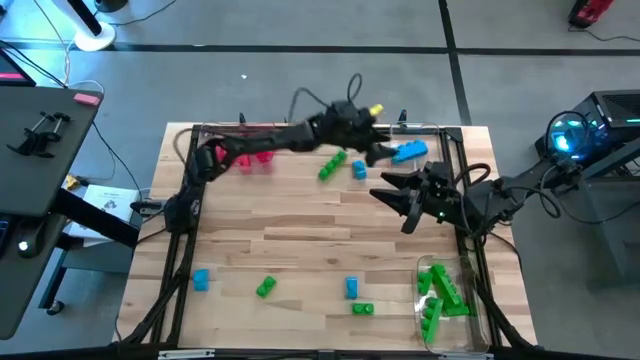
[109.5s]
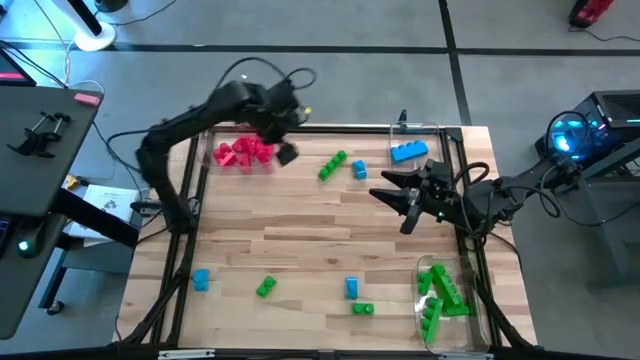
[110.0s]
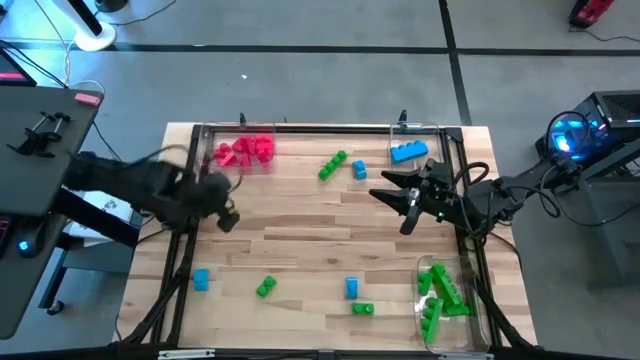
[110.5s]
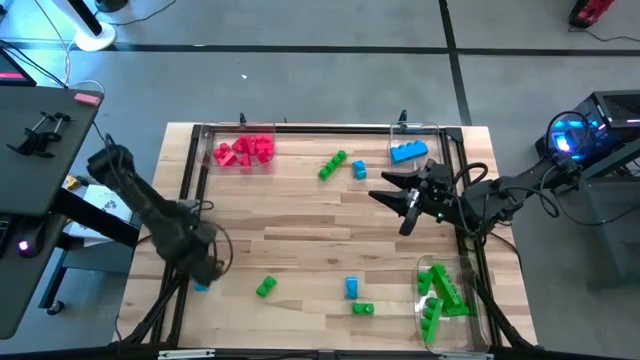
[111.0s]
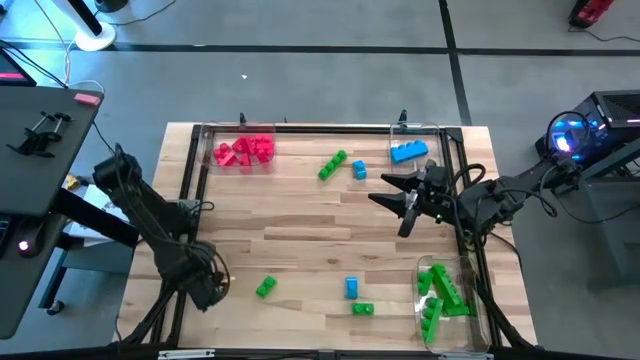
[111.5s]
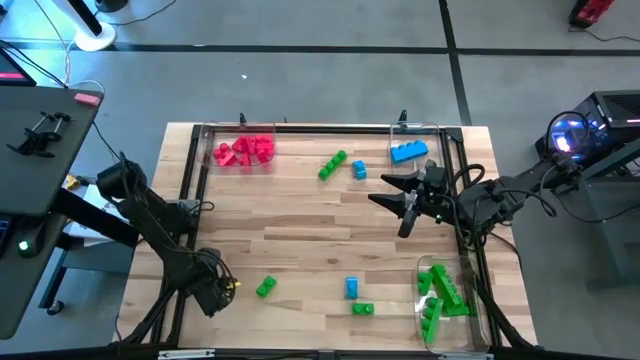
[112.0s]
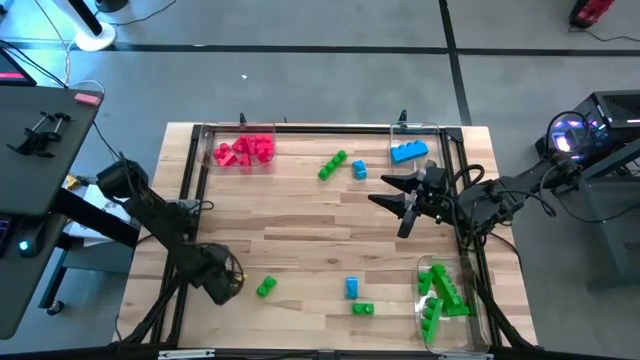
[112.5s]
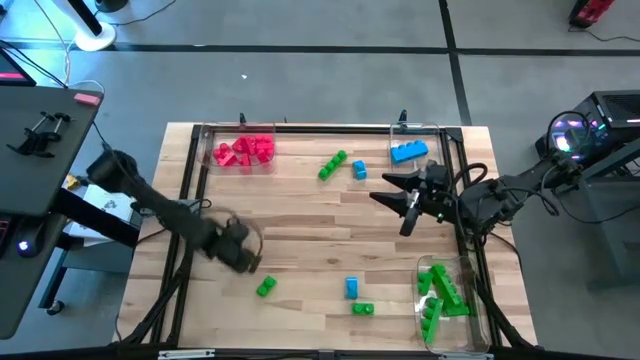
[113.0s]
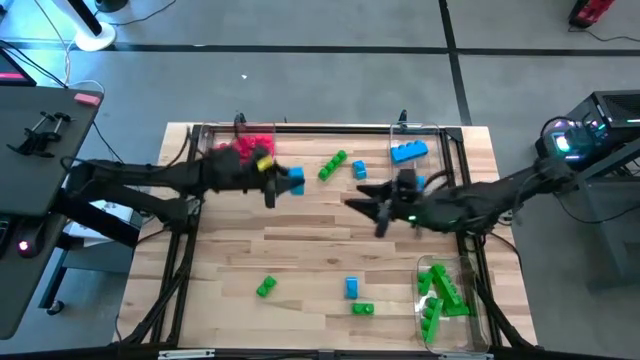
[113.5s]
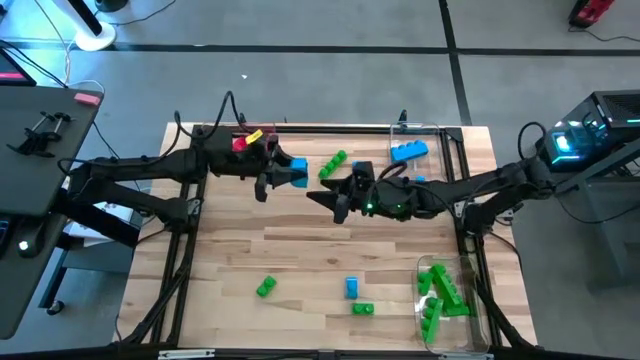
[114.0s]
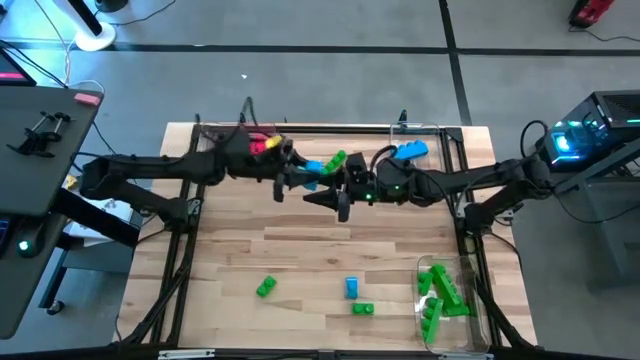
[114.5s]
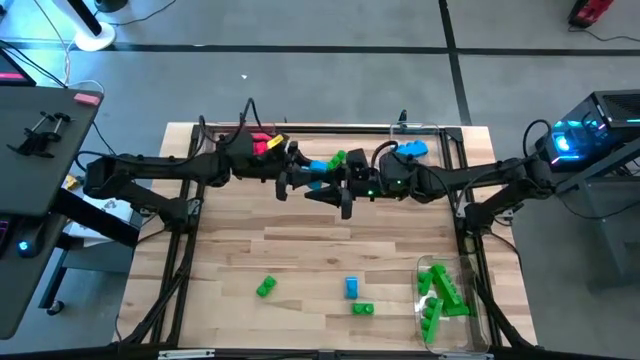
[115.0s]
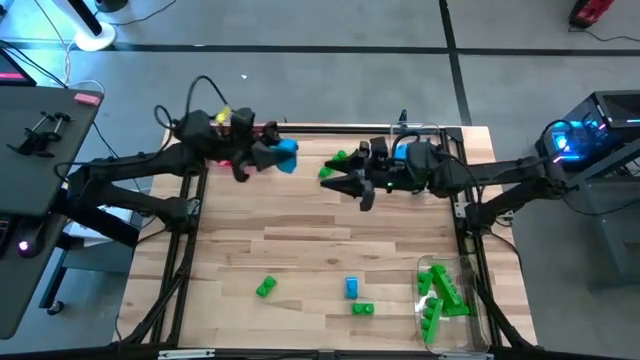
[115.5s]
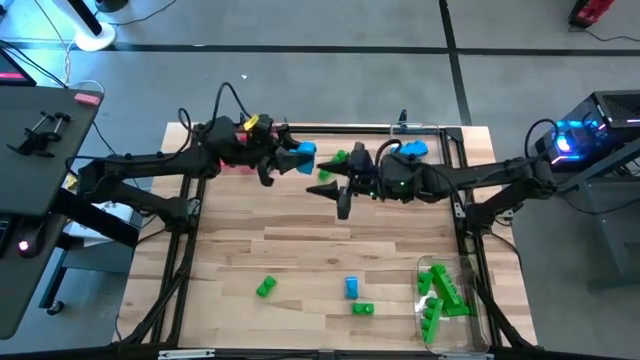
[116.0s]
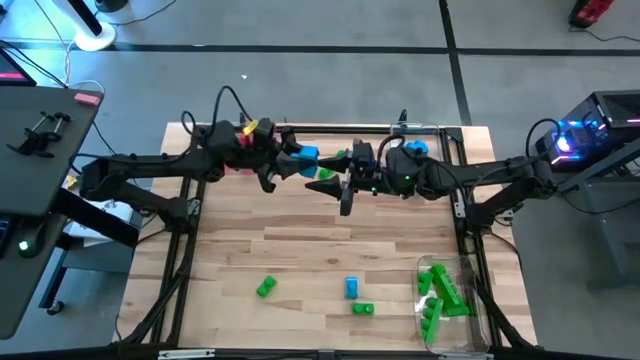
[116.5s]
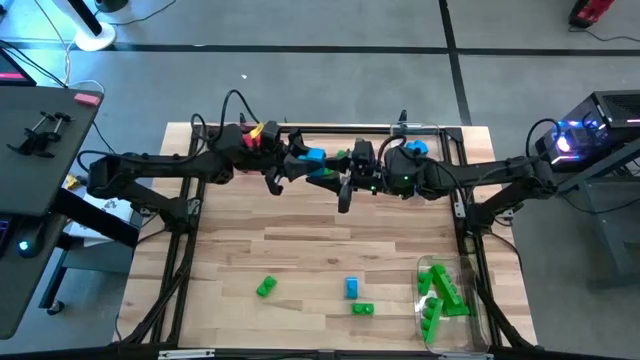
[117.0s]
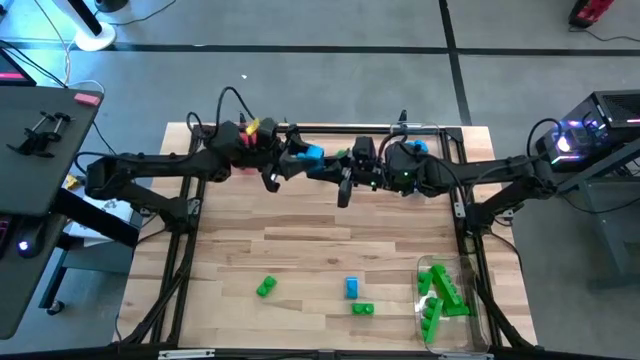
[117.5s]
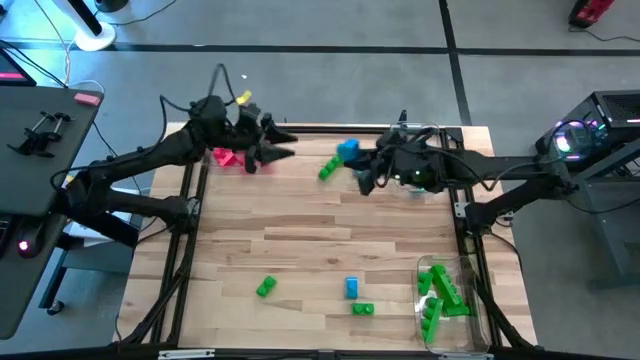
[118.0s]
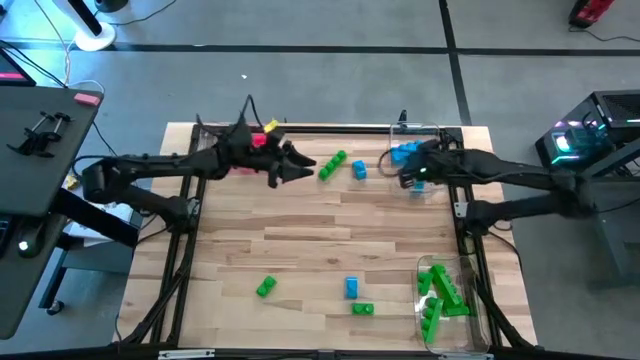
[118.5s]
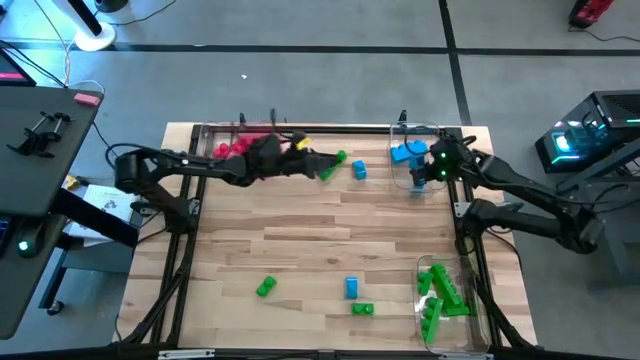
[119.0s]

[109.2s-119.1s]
Task: Sort blocks
Put the blue game piece into the top right transparent bin

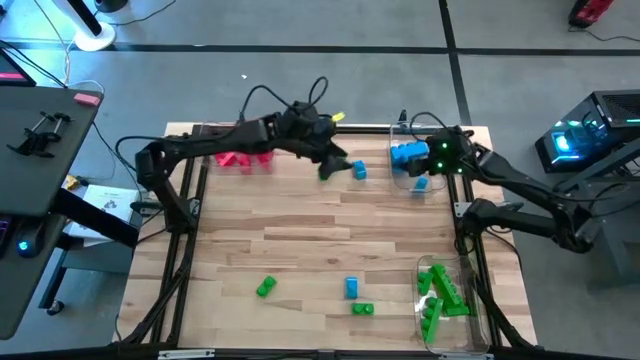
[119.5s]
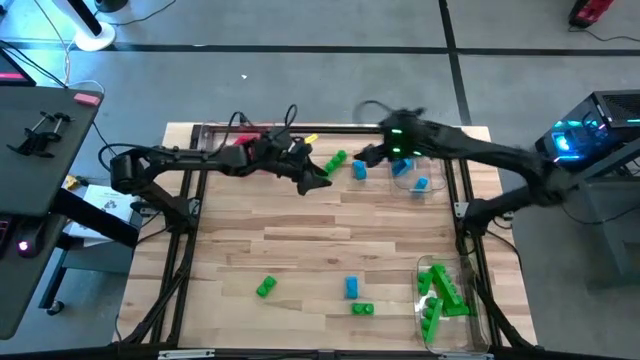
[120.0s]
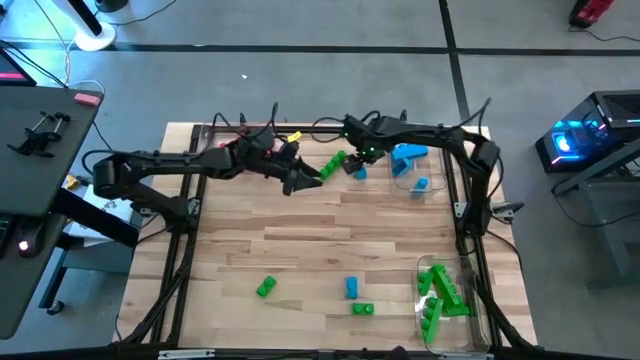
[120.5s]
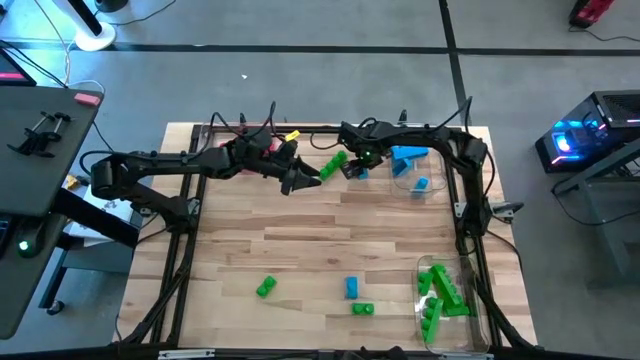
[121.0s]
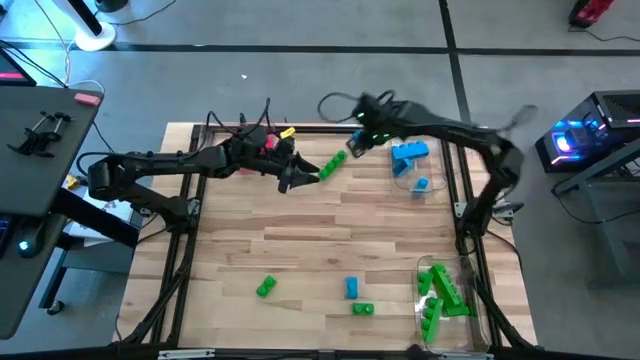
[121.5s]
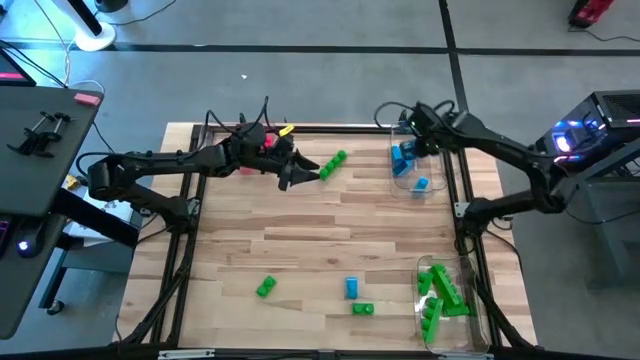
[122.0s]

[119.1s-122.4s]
Put the game piece into the top right transparent bin

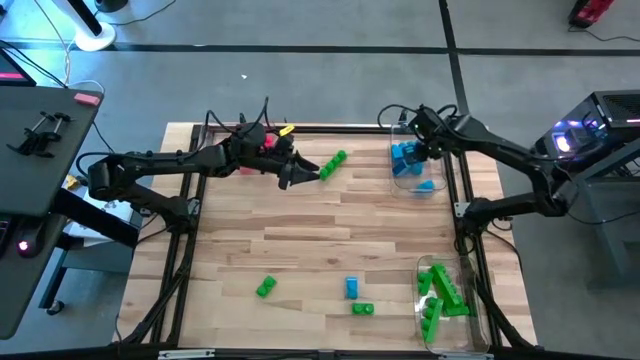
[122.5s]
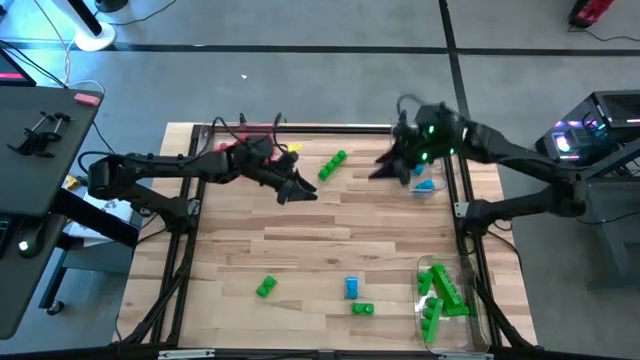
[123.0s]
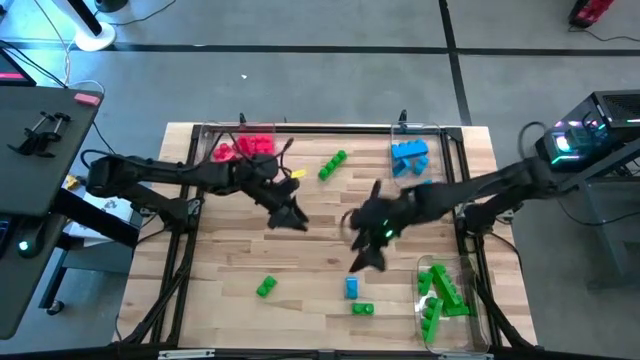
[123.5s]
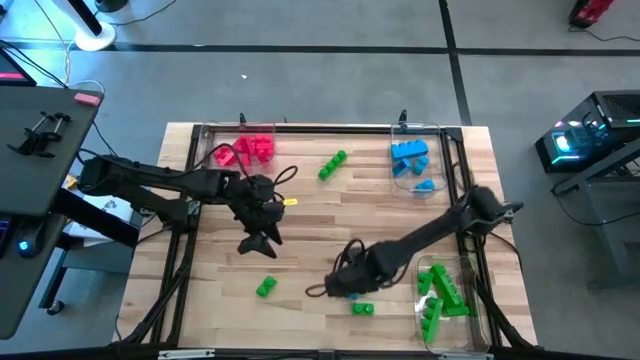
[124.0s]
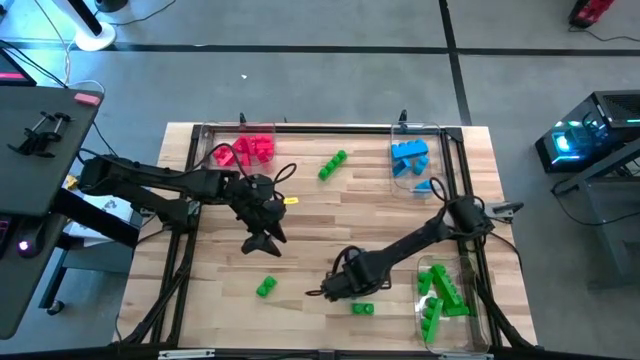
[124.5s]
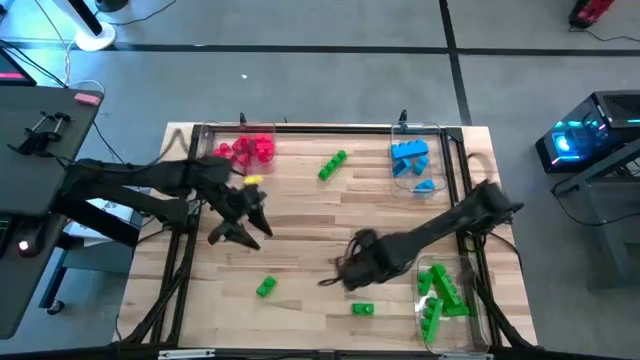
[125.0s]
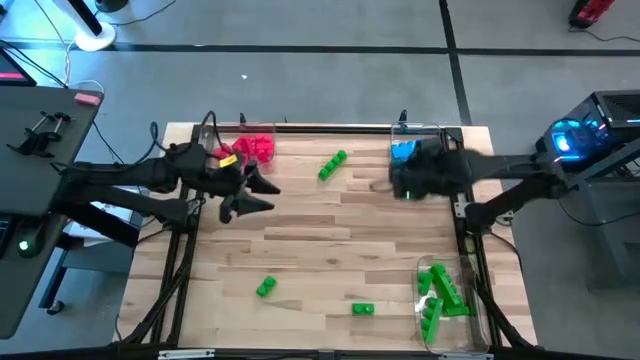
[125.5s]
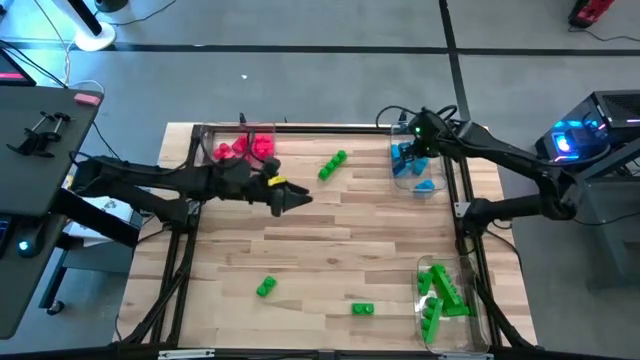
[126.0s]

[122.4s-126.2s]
Put the blue game piece into the top right transparent bin

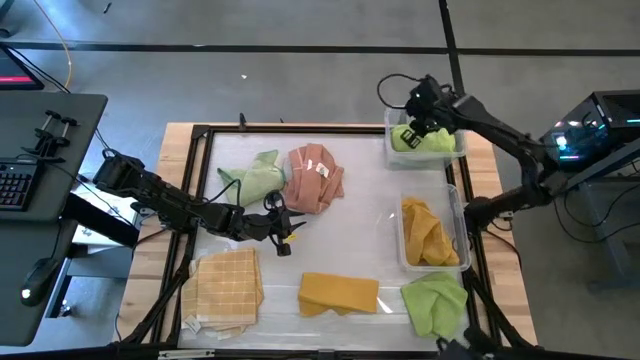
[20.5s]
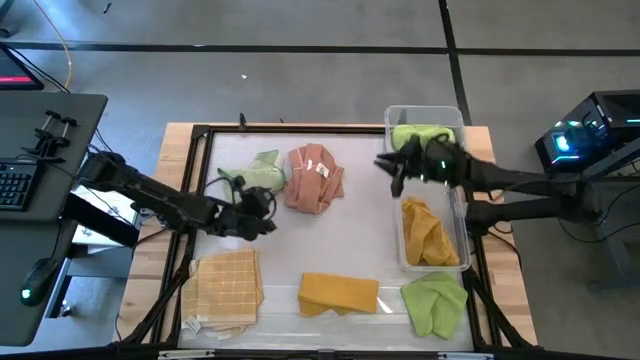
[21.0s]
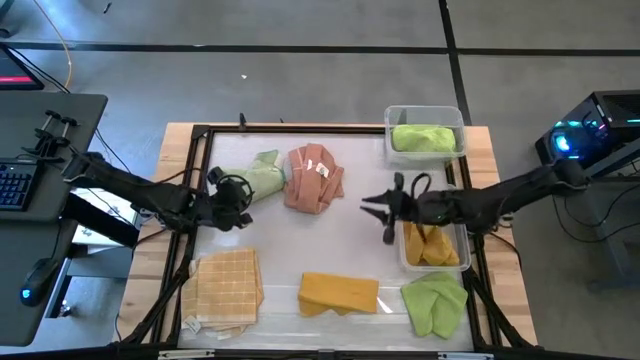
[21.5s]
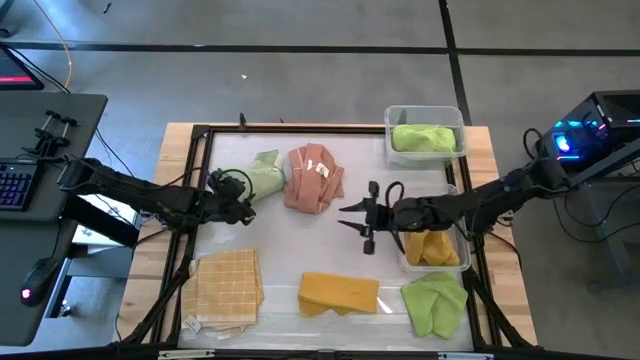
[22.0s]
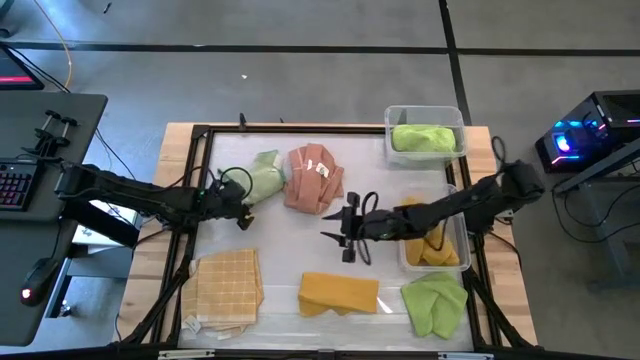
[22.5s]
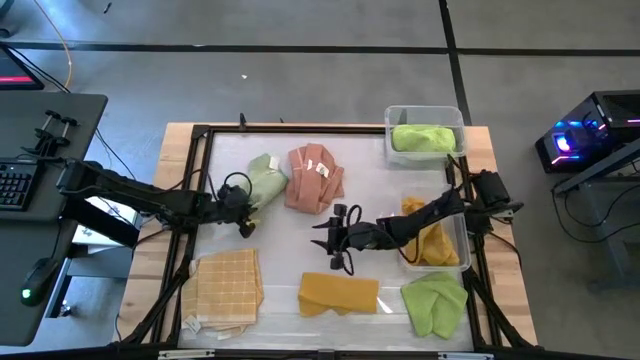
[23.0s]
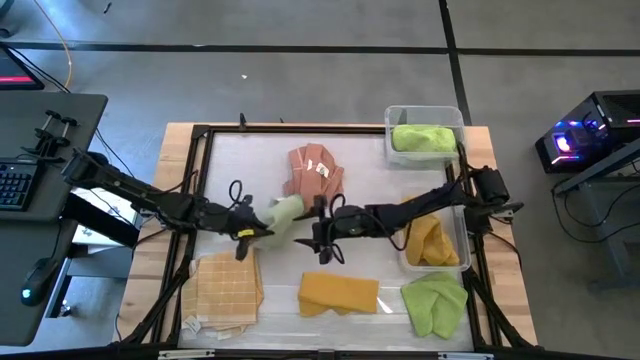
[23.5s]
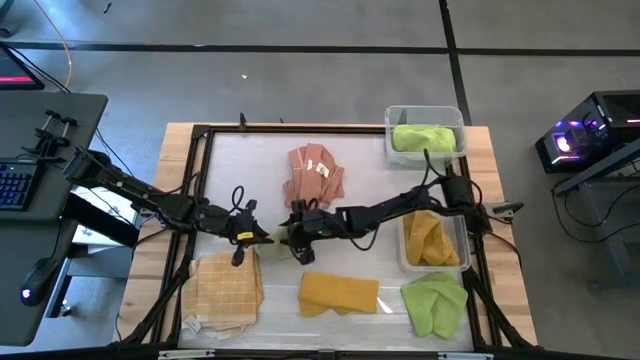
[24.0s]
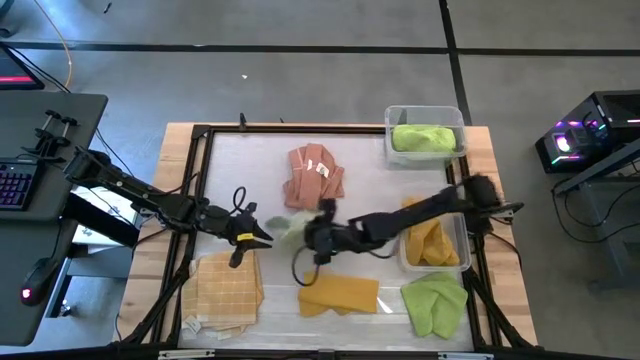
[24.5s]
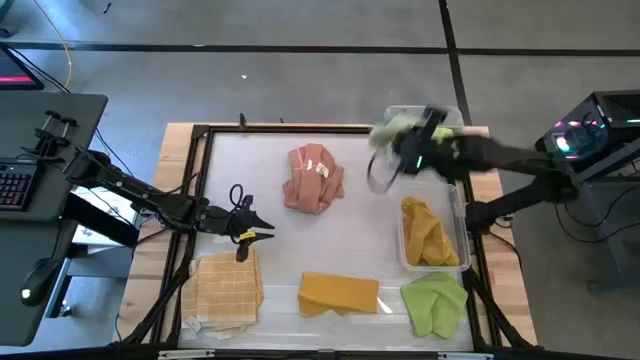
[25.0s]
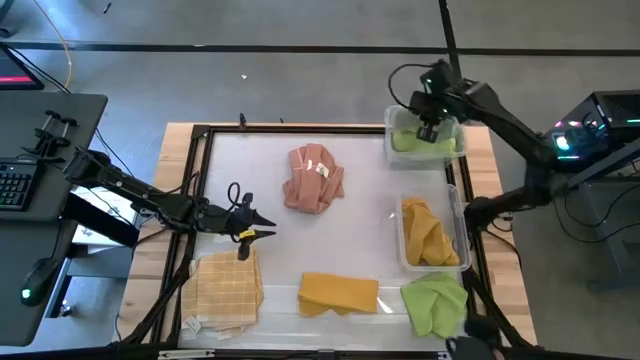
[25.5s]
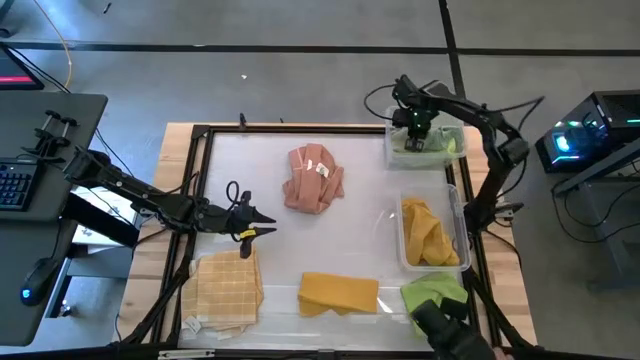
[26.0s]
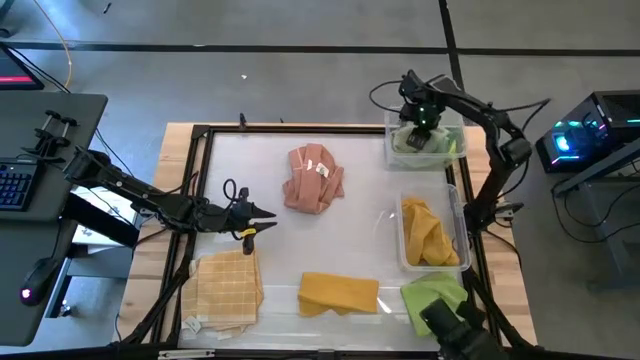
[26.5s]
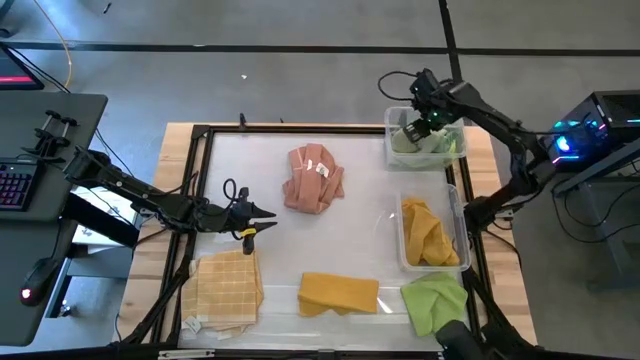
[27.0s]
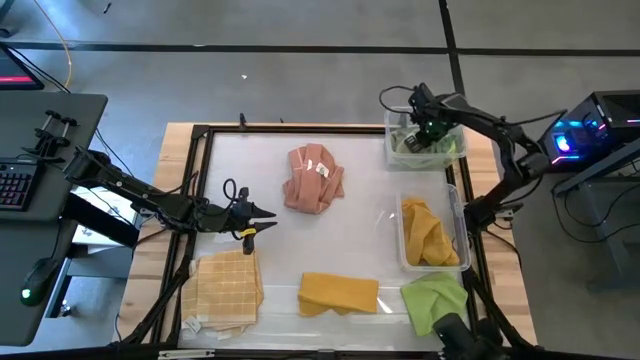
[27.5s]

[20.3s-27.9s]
Task: Sort towels by color in basket
Put the green microfiber towel into the top transparent bin
